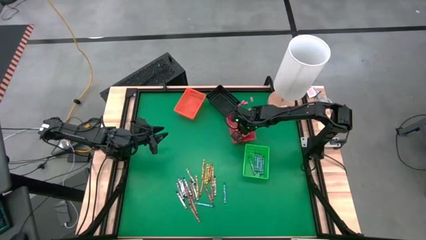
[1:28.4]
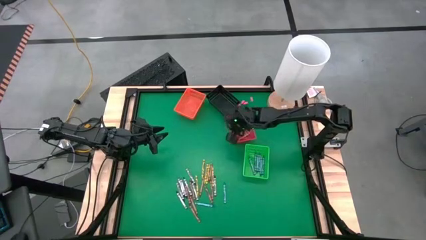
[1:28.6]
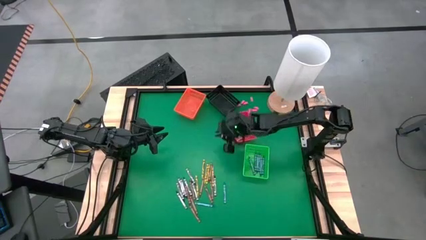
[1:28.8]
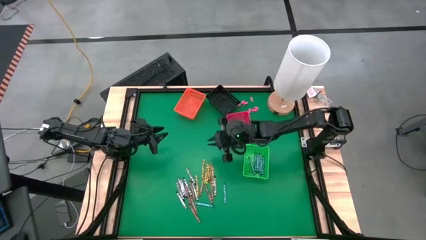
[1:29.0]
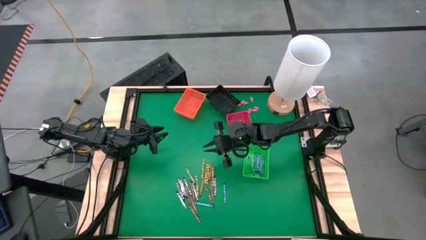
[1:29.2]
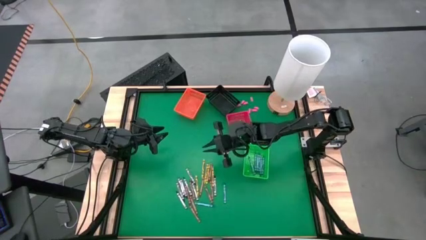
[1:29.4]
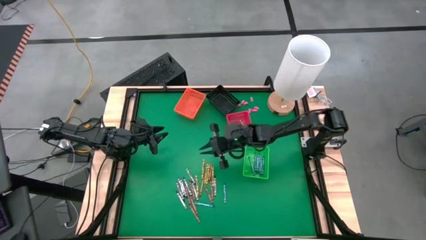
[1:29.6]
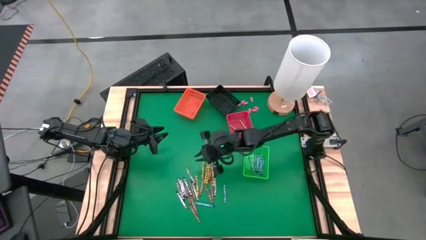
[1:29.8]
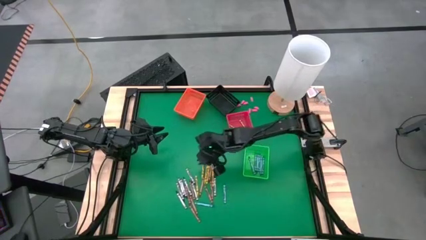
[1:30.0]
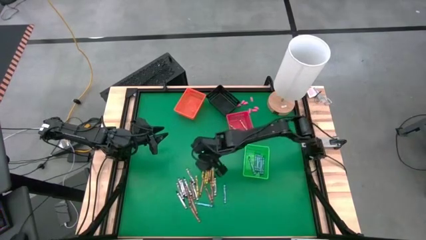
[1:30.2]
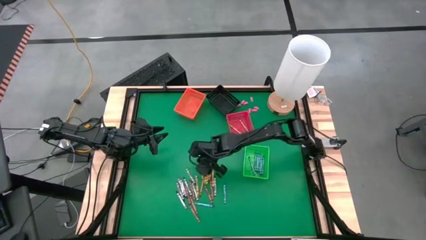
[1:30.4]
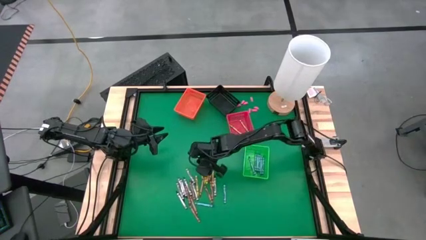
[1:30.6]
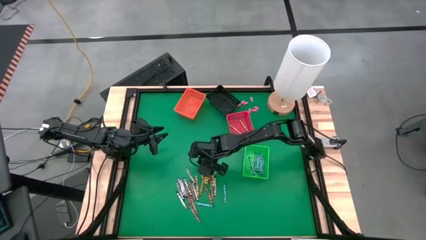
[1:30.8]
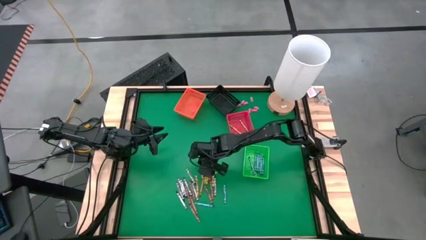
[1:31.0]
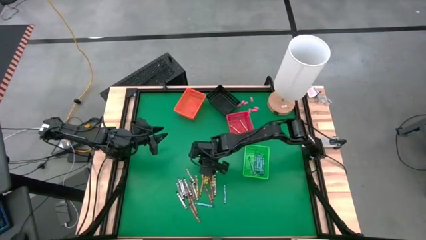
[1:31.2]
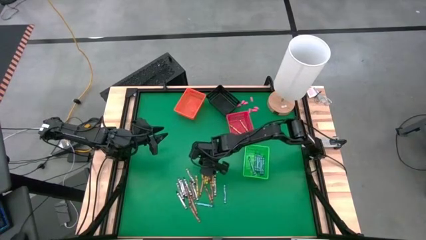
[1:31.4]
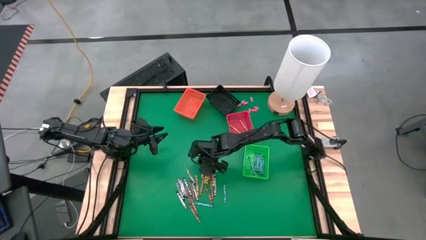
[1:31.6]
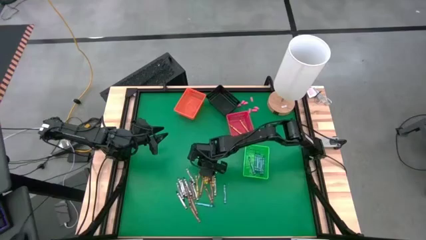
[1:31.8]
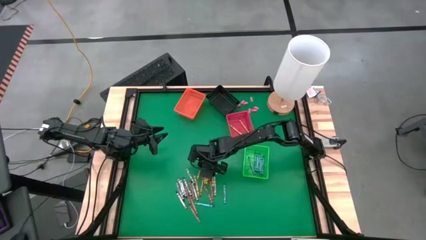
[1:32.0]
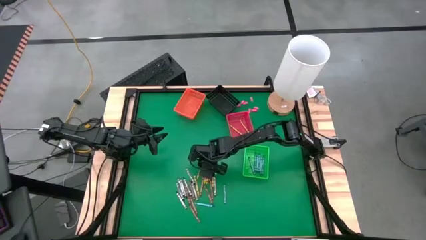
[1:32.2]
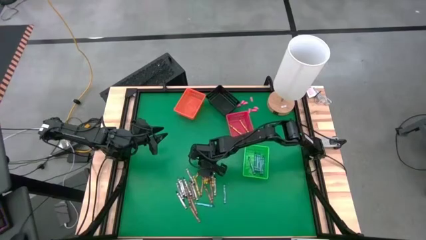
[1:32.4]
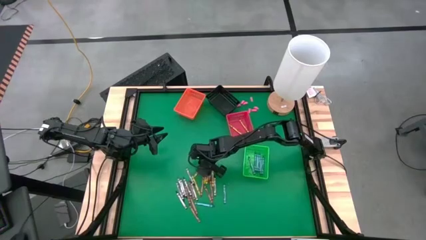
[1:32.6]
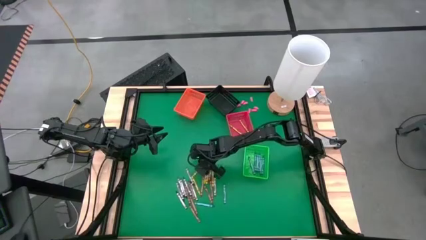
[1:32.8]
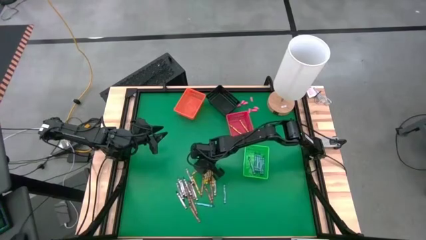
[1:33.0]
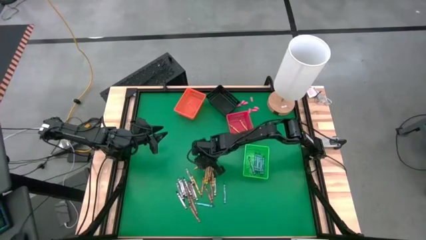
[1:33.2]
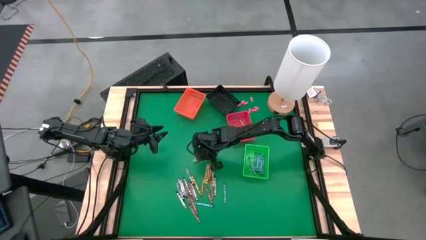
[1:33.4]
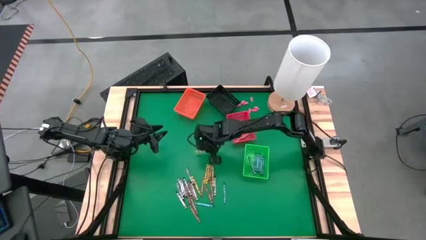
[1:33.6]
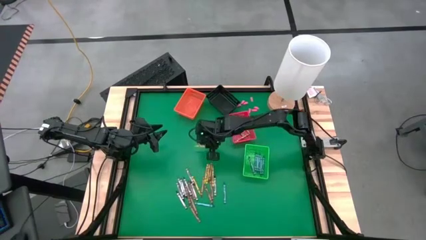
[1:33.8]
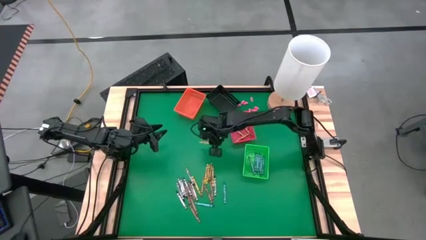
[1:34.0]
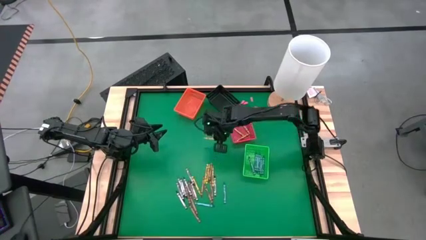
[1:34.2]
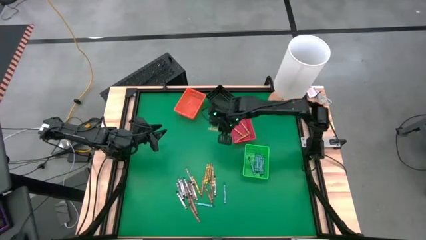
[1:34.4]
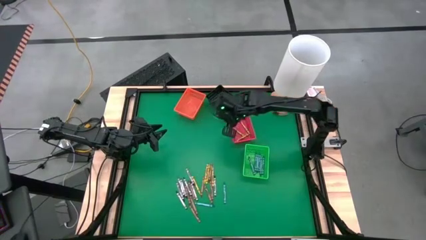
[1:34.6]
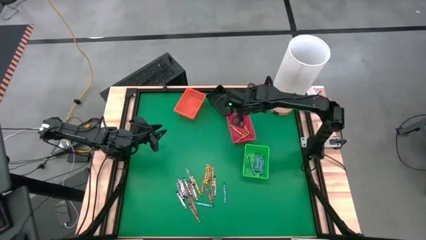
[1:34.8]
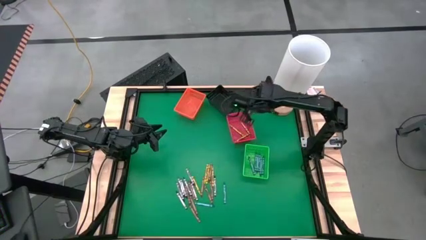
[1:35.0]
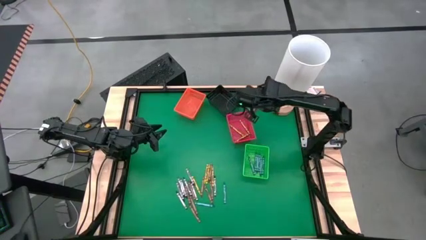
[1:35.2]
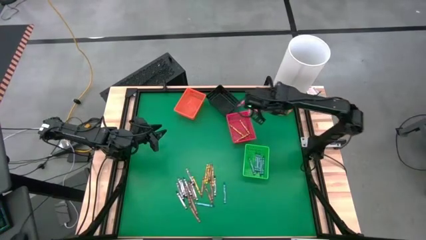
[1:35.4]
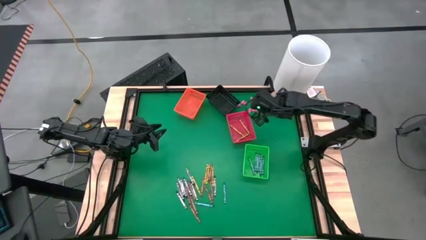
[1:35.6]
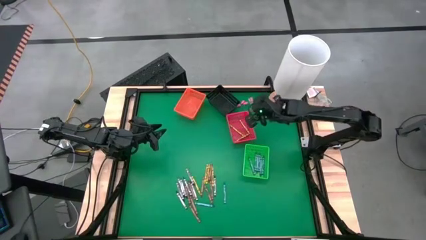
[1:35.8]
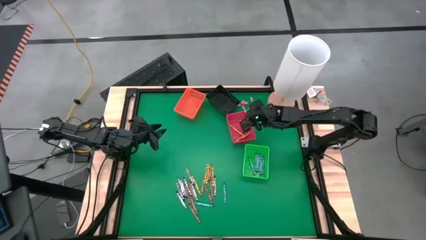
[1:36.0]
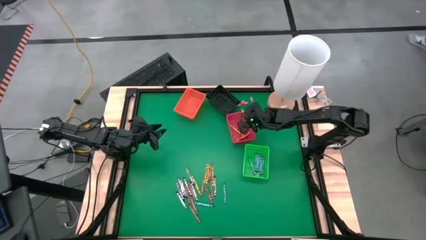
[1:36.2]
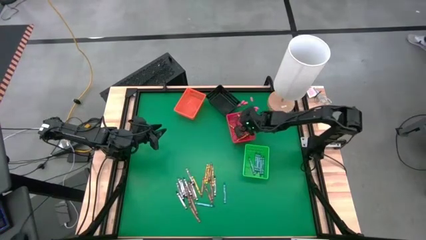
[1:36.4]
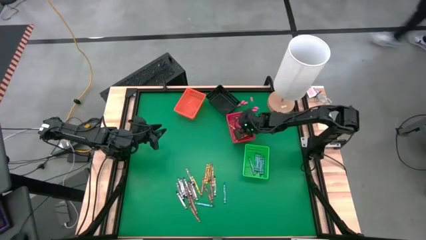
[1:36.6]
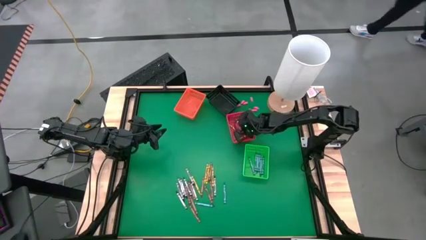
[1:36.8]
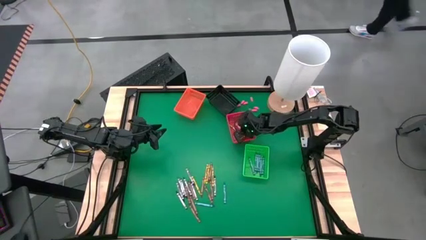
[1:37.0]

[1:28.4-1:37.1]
Task: Sort crayons
Put the yellow crayon into the red bin

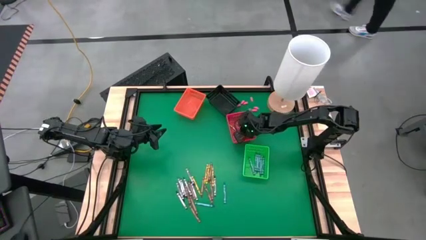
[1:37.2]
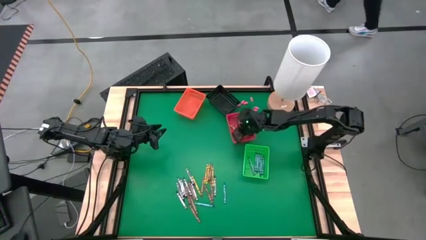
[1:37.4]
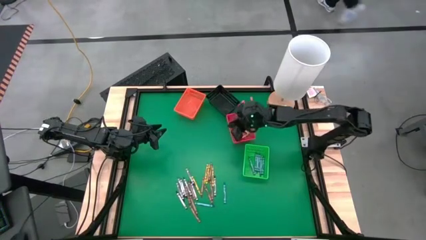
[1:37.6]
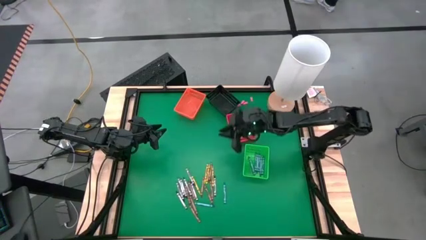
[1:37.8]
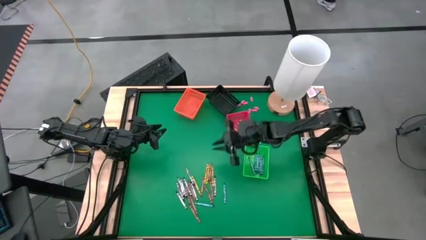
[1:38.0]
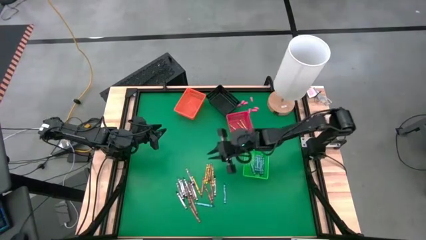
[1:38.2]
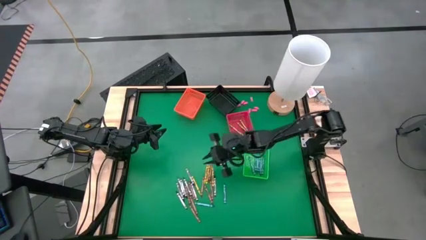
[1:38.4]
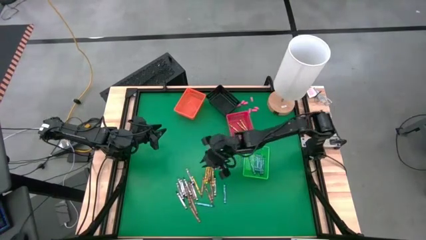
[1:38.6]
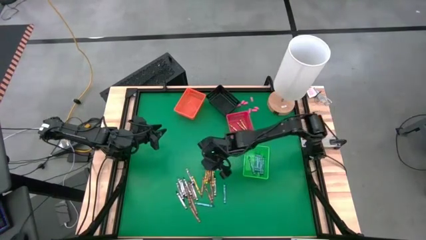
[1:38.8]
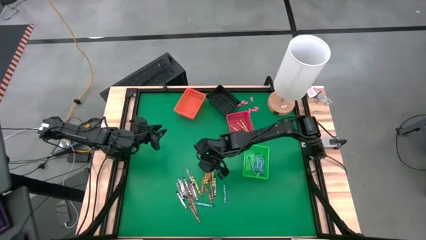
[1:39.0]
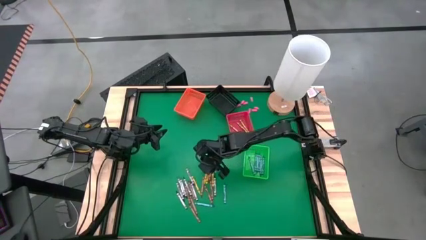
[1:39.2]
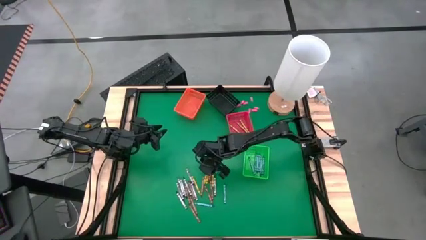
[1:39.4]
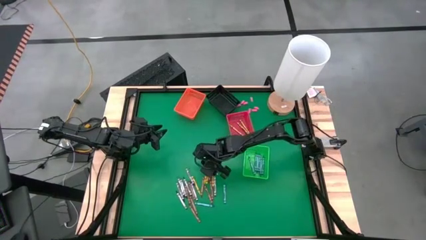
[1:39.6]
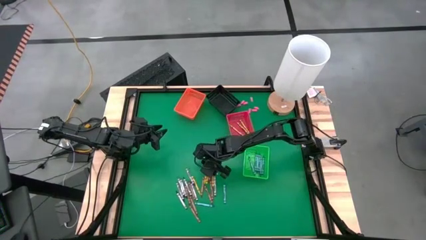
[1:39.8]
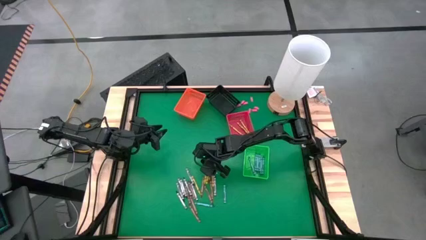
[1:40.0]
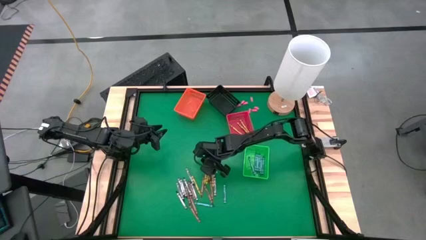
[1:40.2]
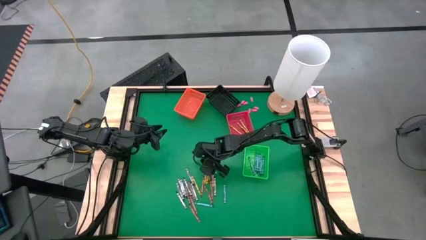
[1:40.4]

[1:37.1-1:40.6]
Put the yellow crayon into the red bin

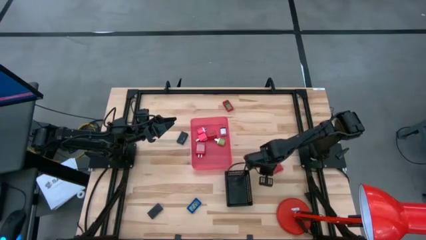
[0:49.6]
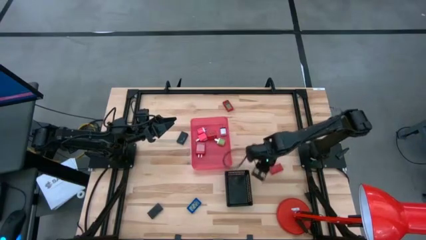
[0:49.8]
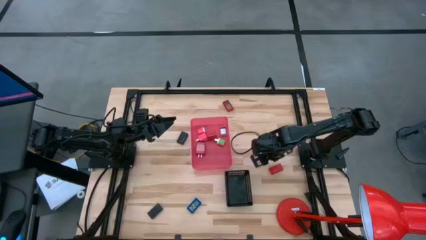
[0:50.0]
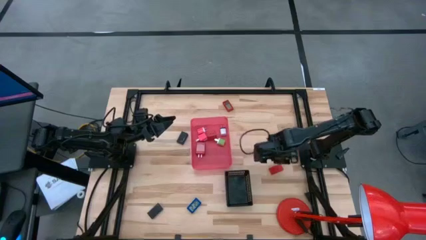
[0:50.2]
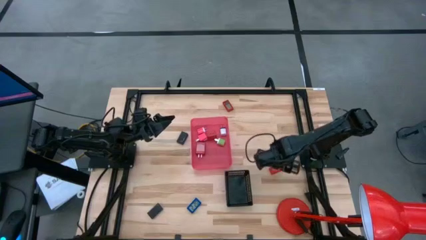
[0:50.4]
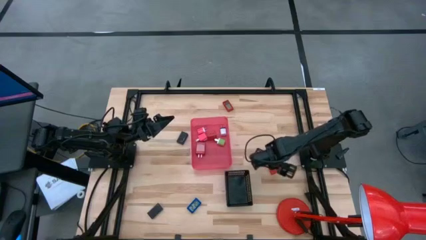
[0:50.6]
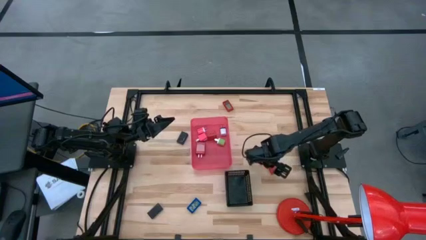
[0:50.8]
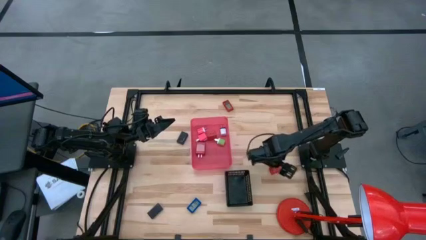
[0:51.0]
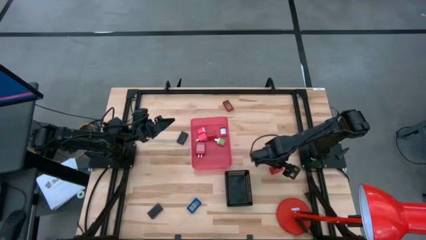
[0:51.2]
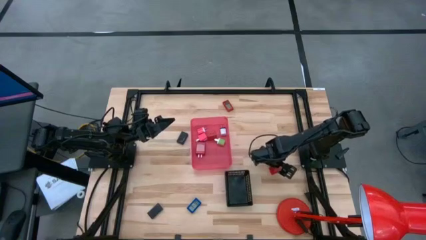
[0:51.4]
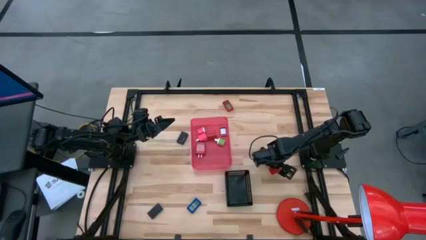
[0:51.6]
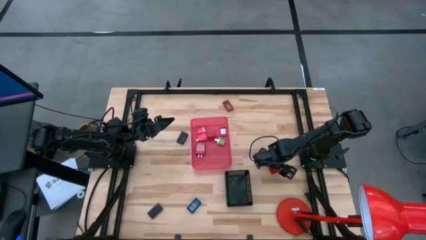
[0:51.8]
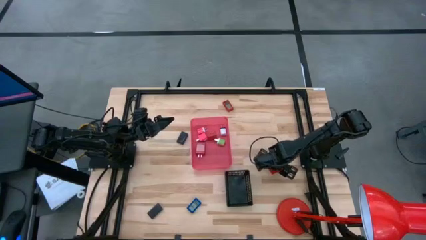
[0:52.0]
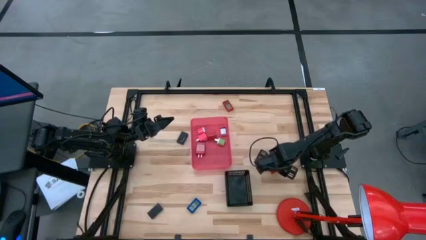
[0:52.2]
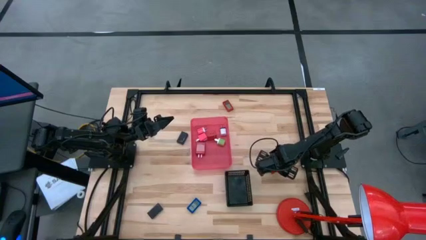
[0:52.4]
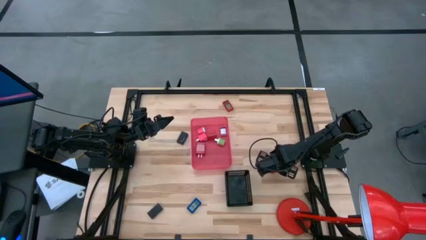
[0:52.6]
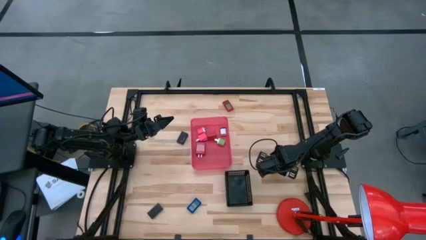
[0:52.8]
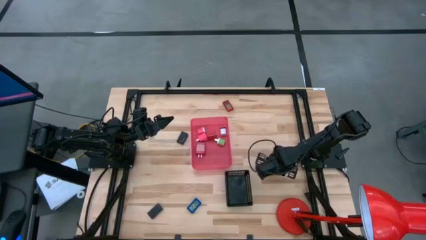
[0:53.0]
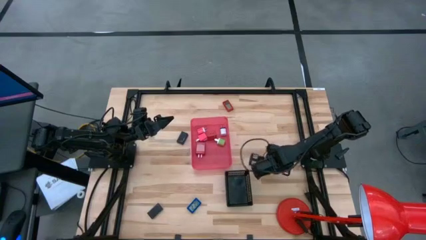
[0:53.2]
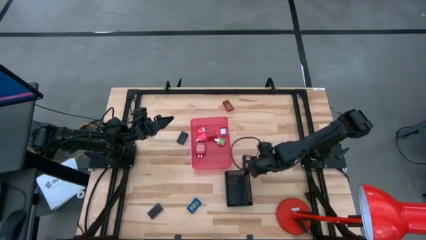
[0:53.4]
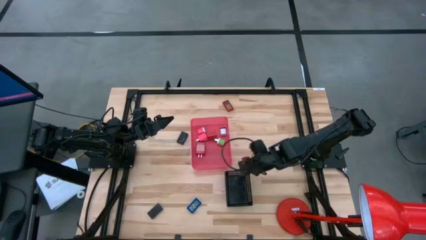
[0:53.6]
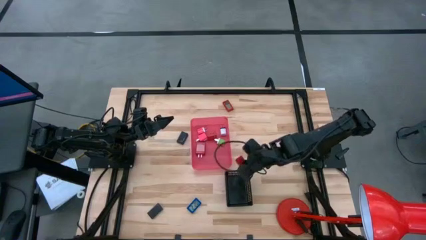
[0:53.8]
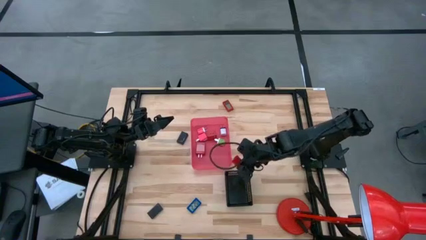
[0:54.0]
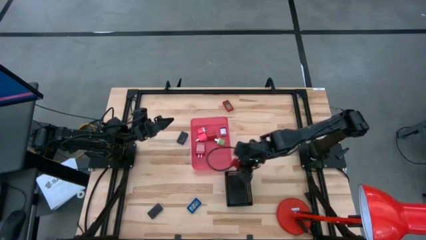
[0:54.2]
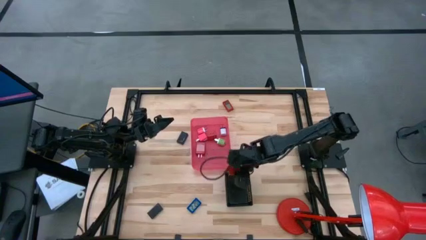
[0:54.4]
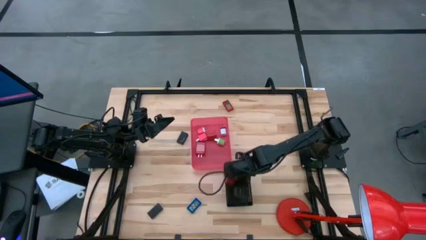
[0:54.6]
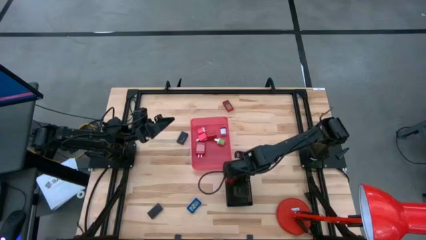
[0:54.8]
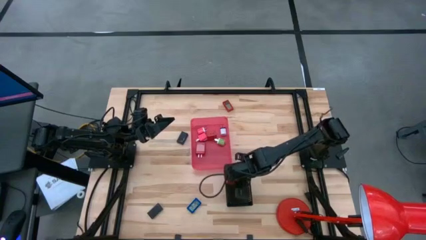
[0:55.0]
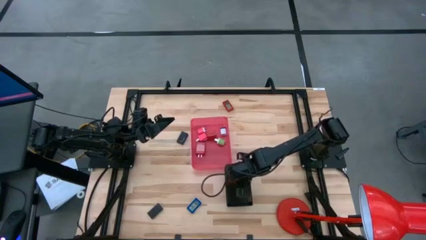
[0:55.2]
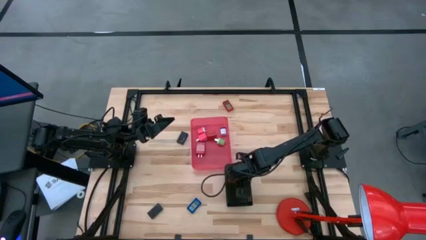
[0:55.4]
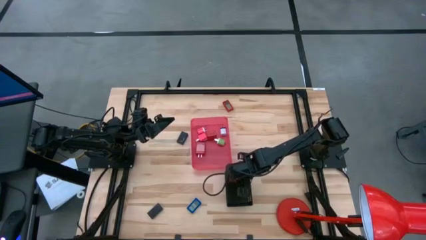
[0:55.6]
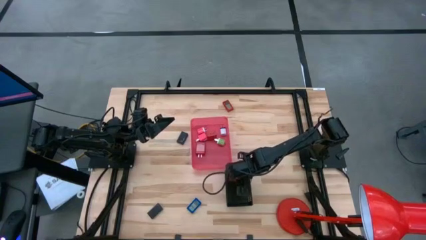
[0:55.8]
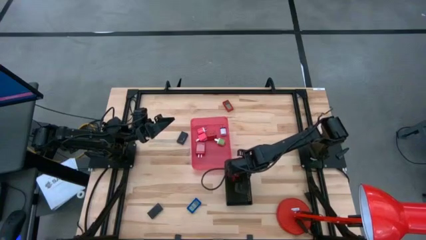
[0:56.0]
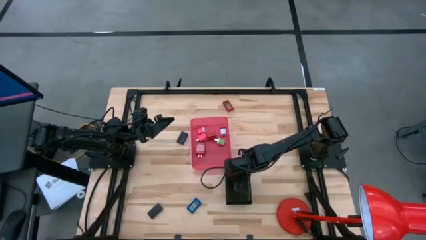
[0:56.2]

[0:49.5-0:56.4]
Task: Pick & Place Office items
Put the bottom red digital timer into the black bin
